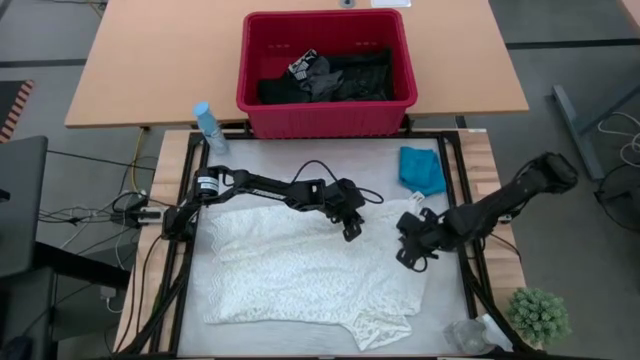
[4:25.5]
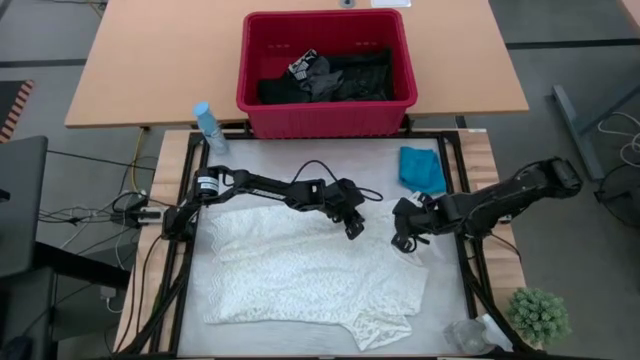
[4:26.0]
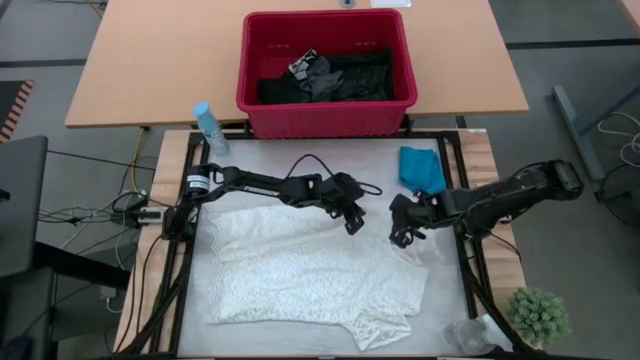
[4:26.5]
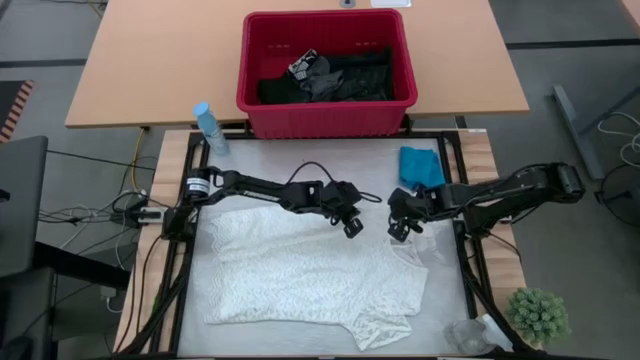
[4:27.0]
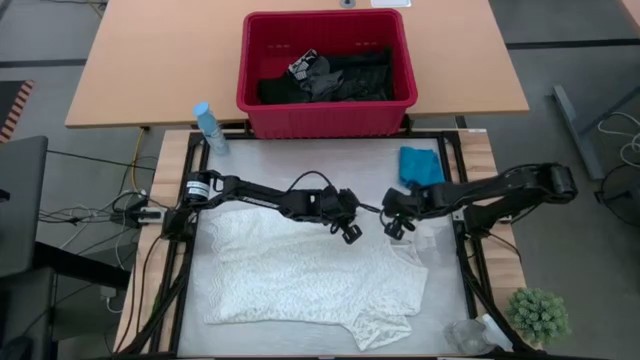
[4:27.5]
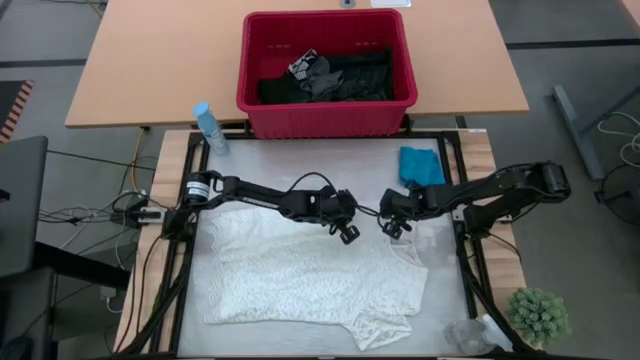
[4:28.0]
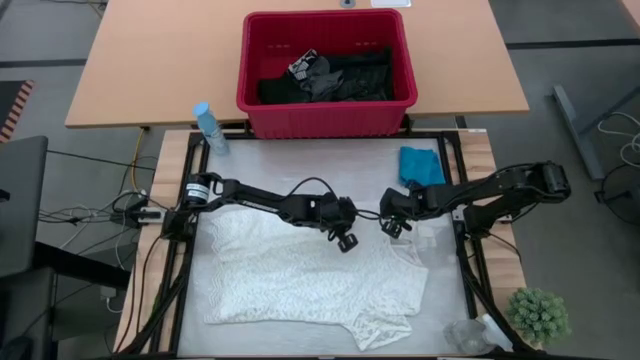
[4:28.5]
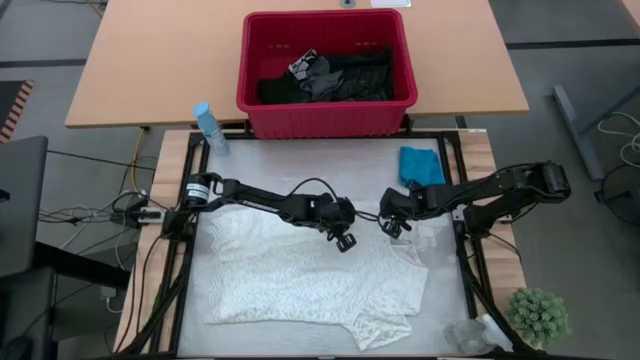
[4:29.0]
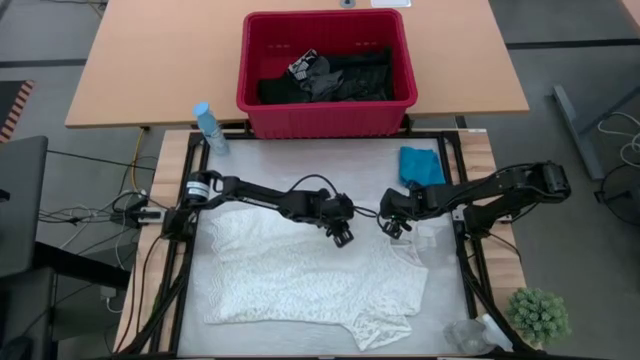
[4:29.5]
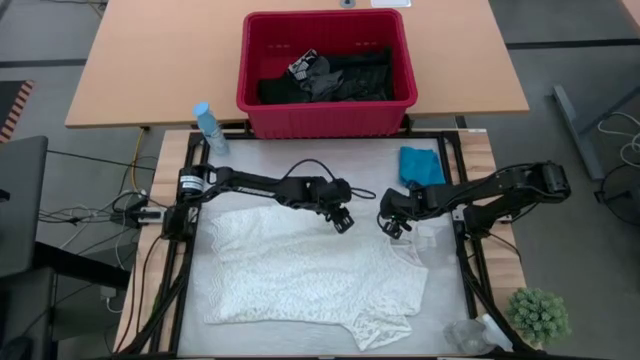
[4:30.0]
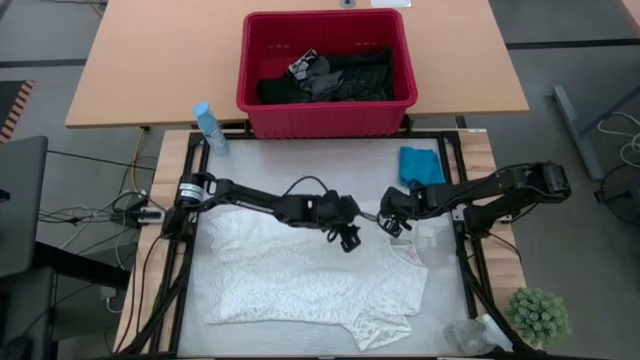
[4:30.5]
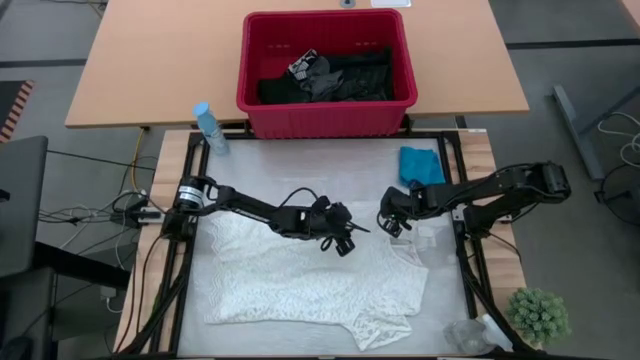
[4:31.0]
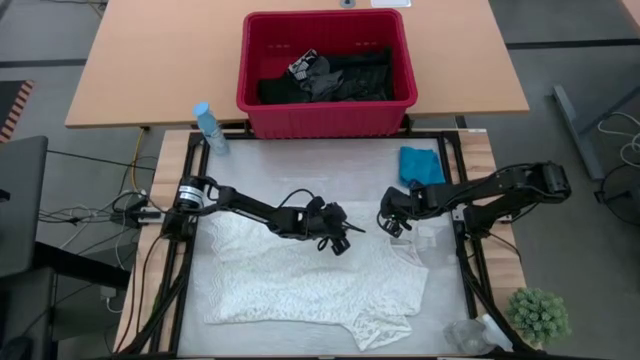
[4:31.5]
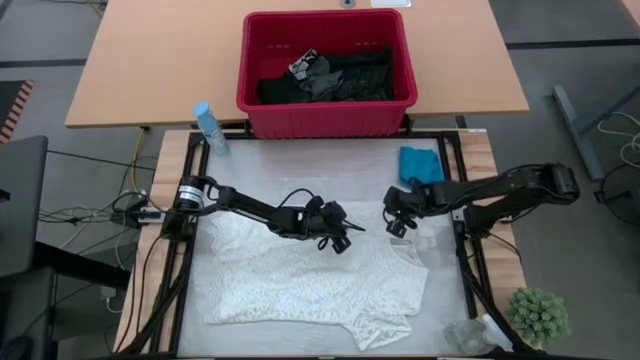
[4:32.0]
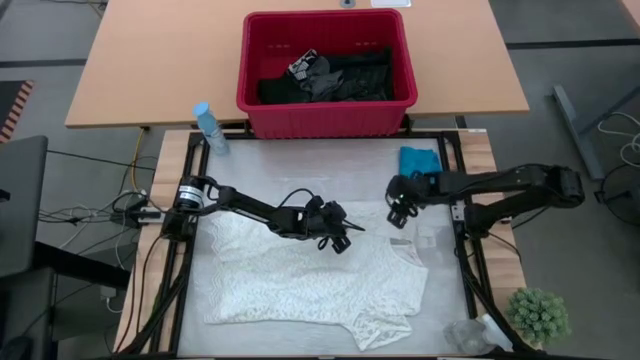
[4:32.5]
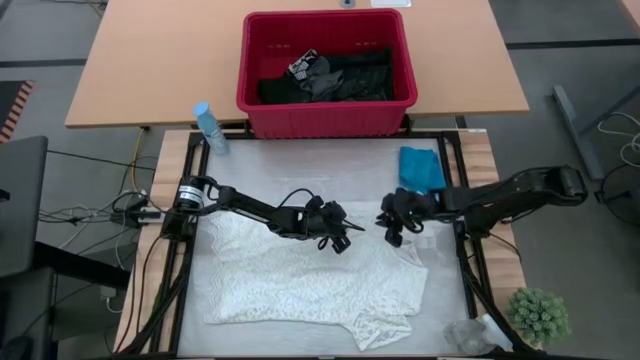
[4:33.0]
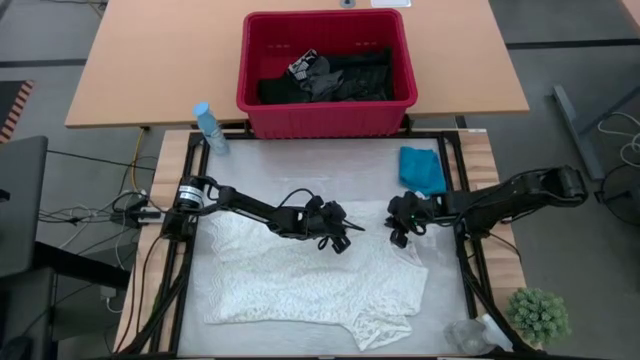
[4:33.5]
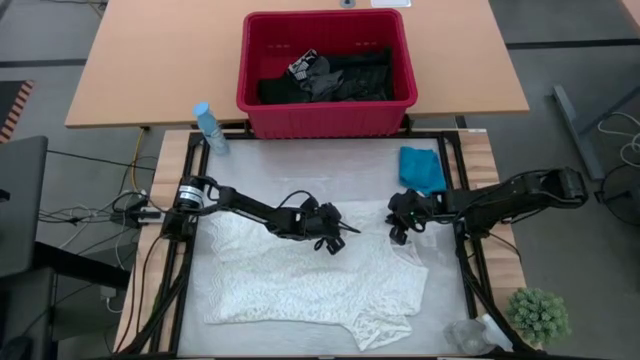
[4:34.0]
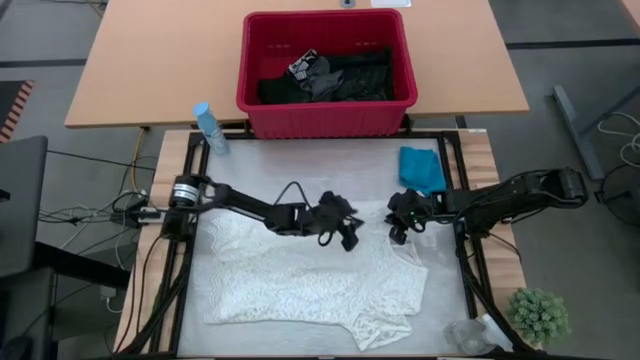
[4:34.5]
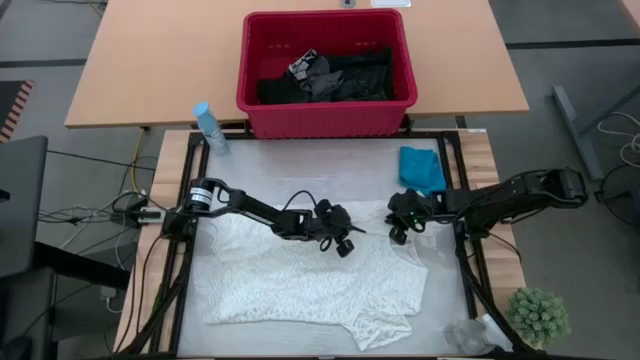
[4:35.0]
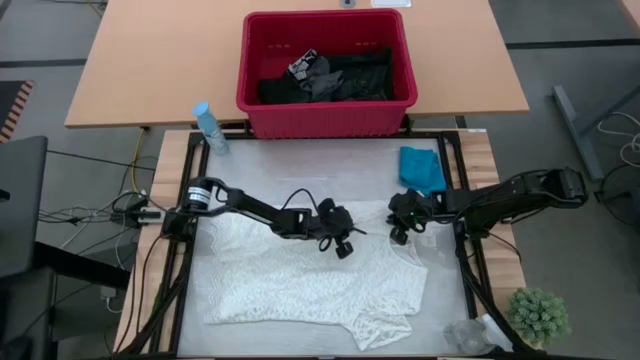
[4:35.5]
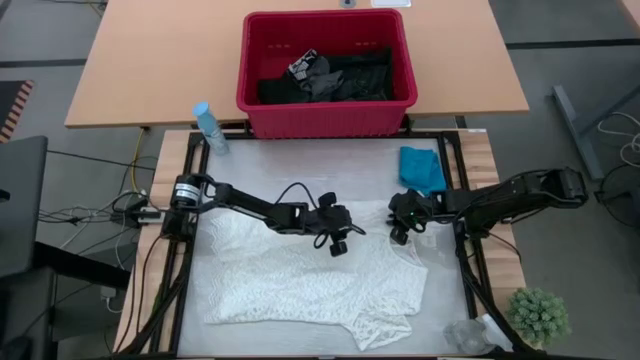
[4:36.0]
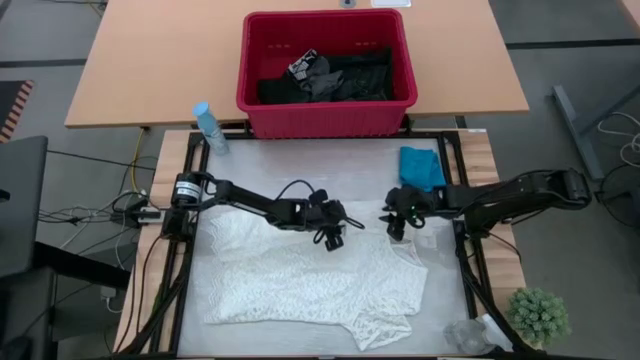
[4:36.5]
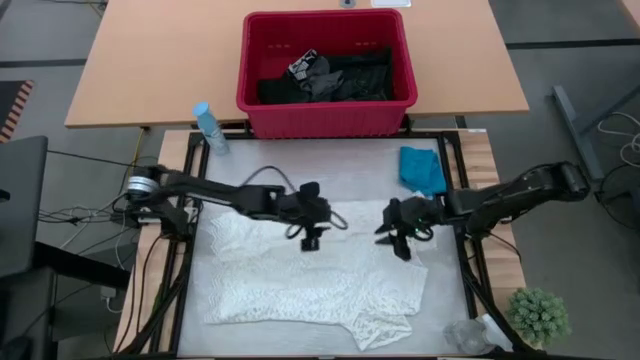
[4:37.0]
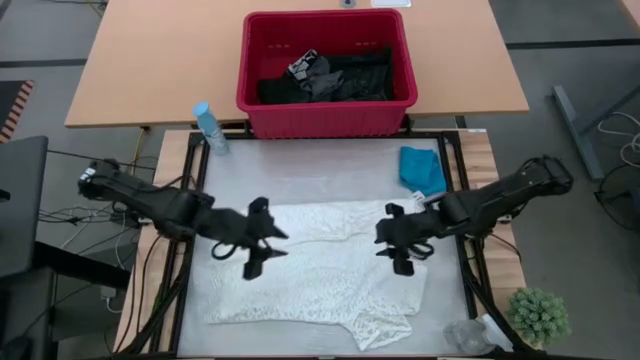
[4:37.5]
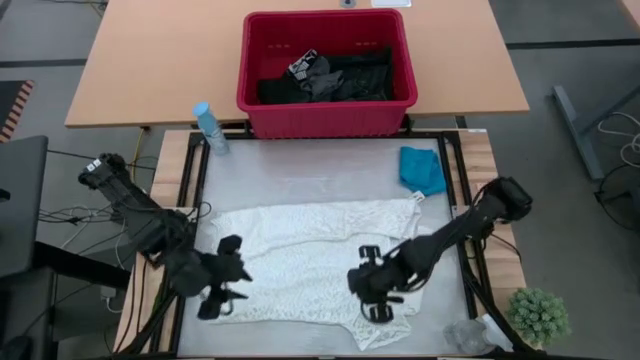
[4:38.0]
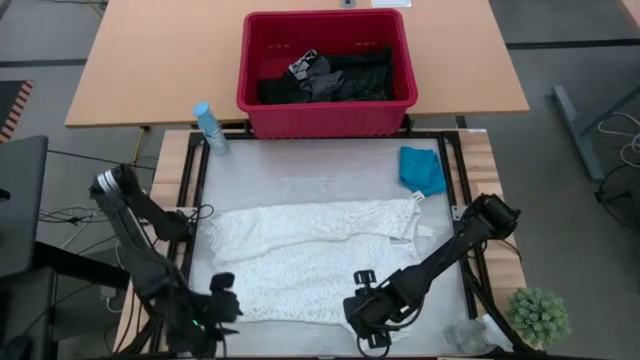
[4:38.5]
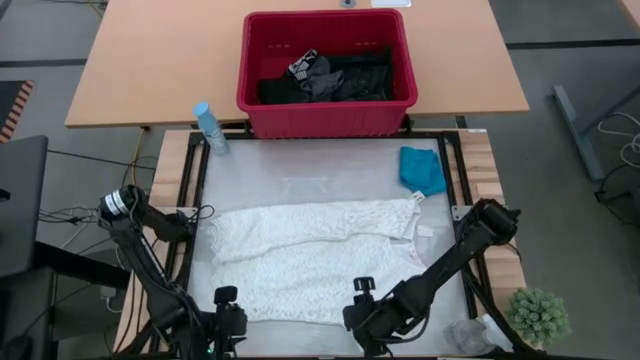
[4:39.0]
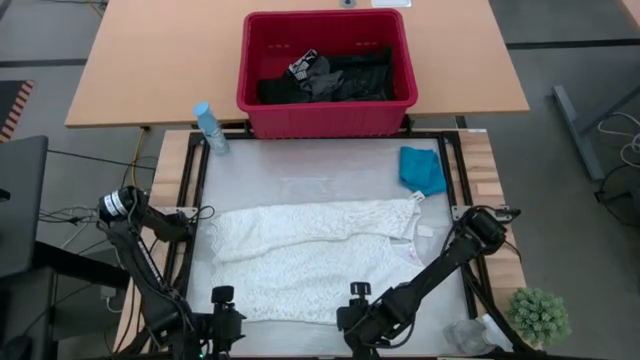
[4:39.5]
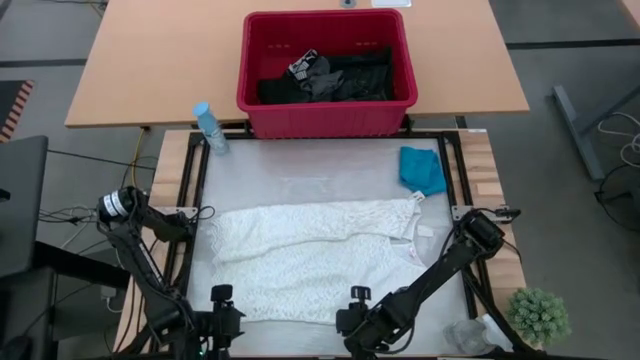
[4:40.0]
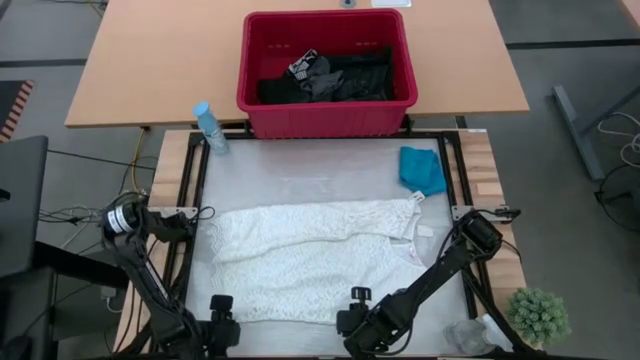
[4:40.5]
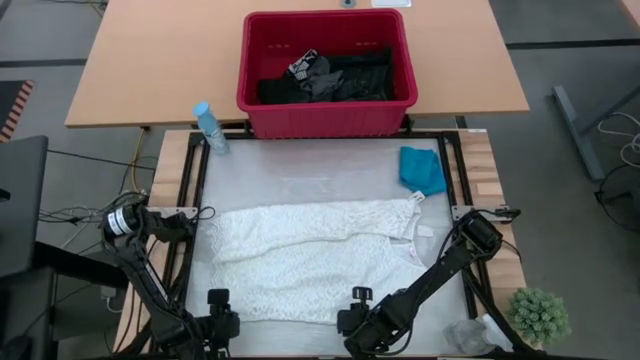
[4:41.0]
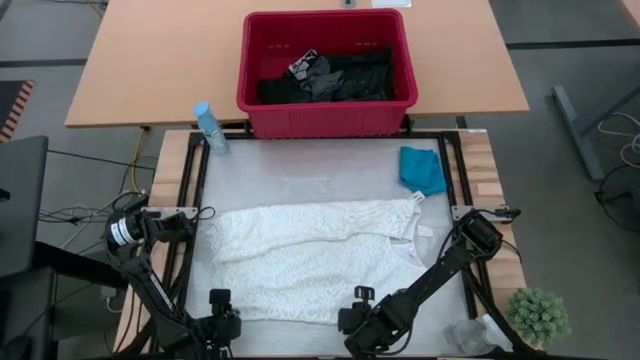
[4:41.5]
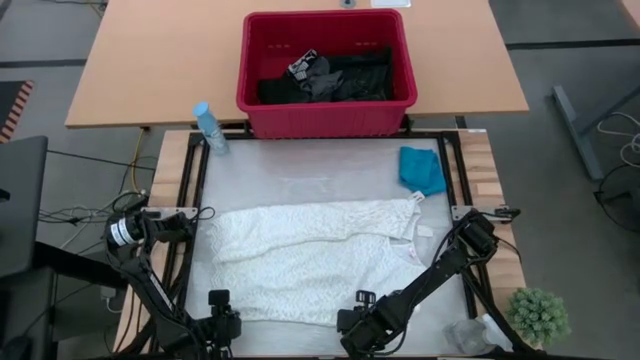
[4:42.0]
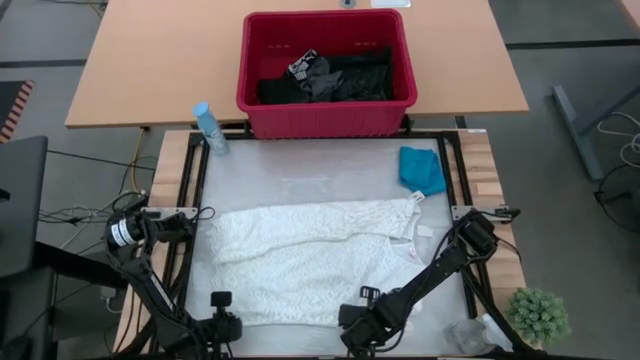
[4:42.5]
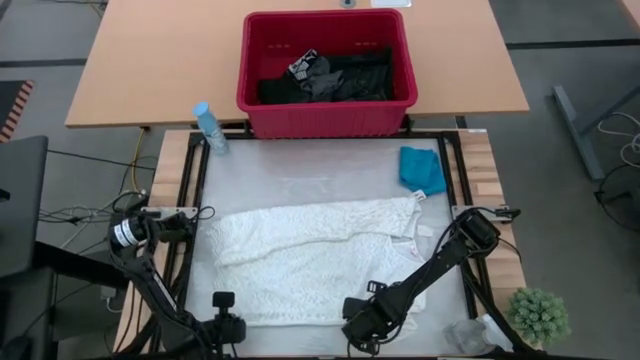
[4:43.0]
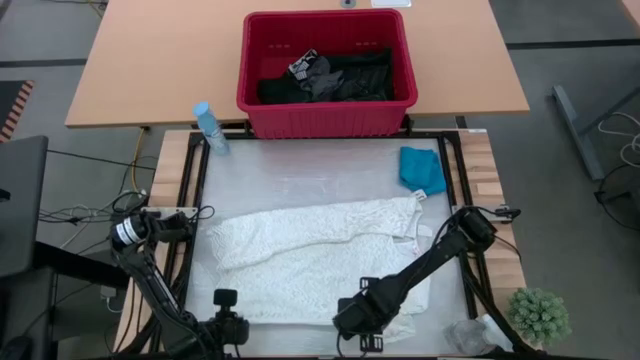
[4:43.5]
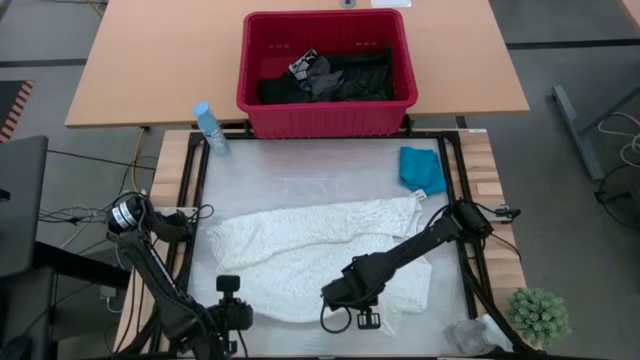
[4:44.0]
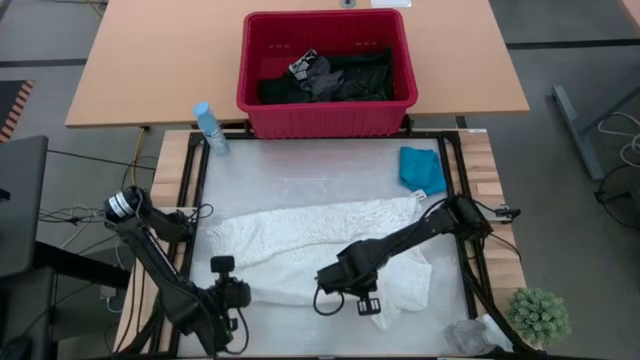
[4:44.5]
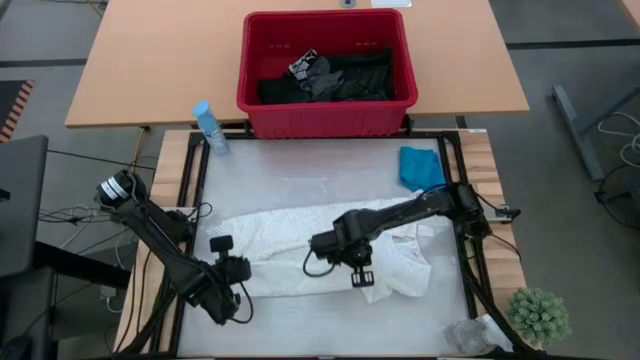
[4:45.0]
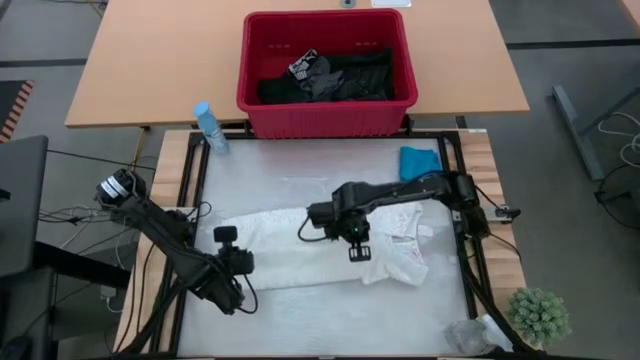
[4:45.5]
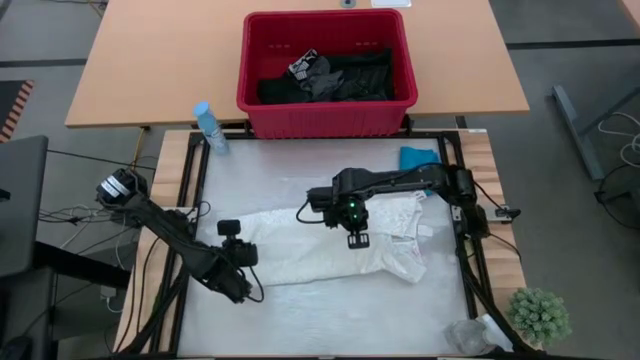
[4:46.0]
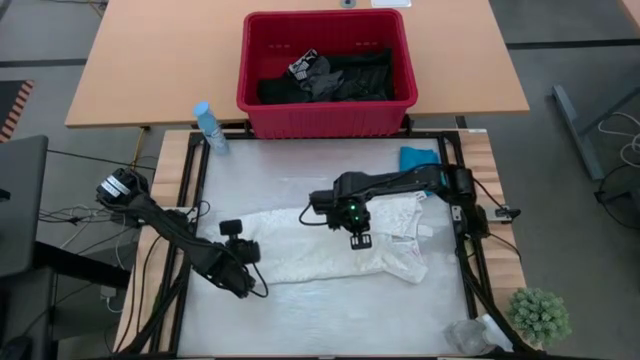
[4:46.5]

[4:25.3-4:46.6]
Task: Fold laundry
Fold the white shirt

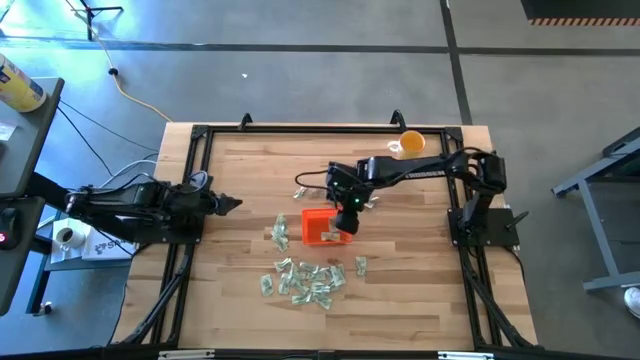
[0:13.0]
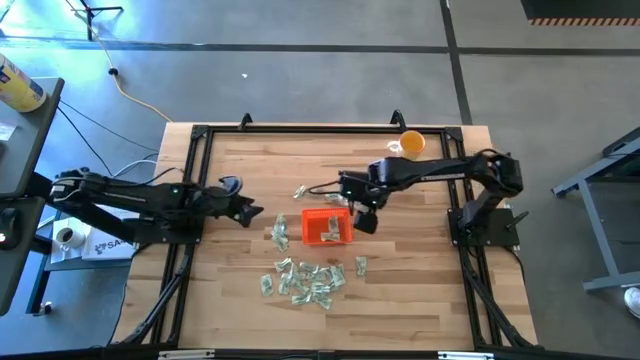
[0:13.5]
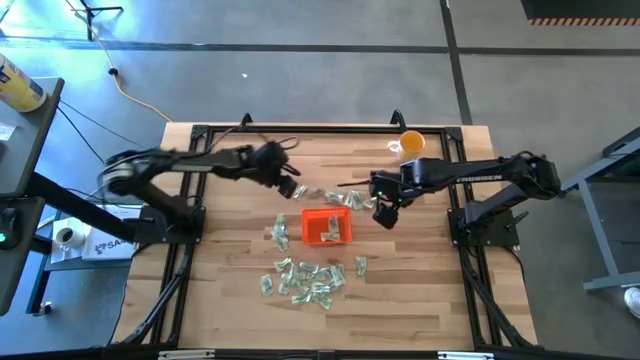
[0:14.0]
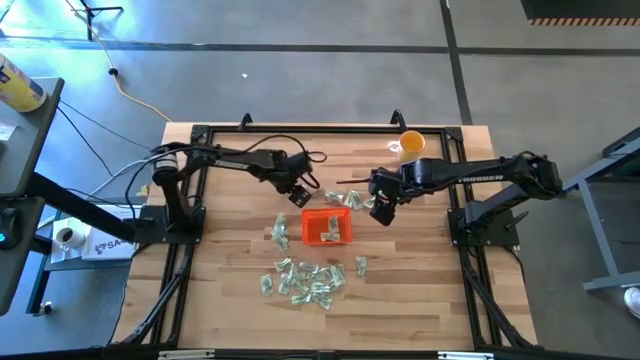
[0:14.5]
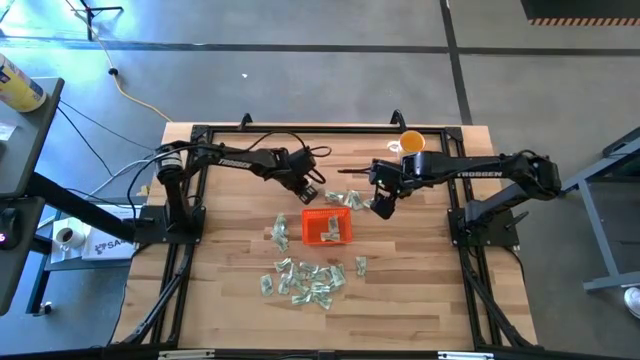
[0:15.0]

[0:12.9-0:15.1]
Task: Pick and place Stevia / Truvia into bins
Put the stevia packet into the orange bin
